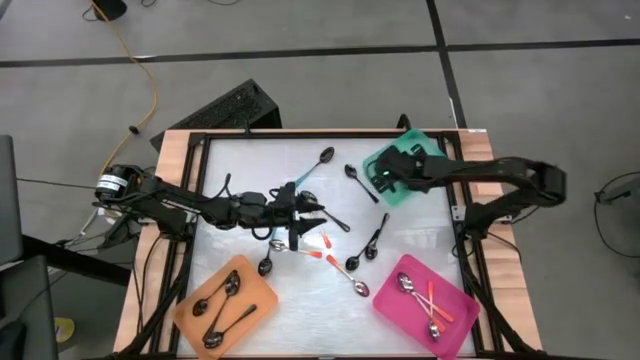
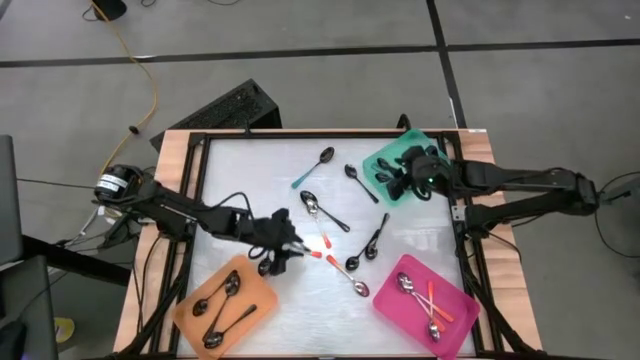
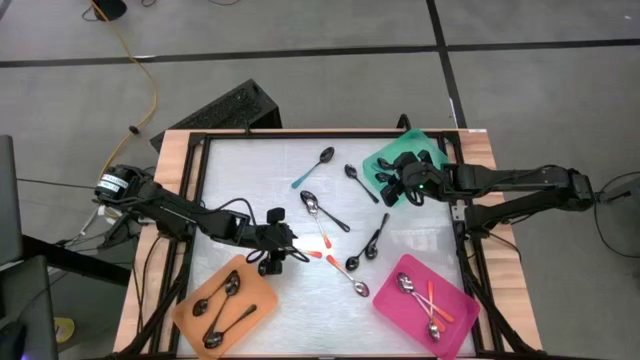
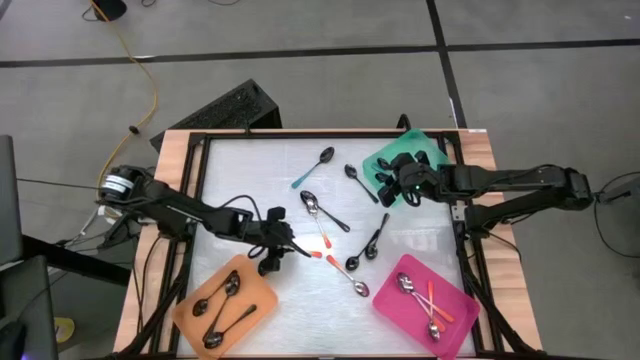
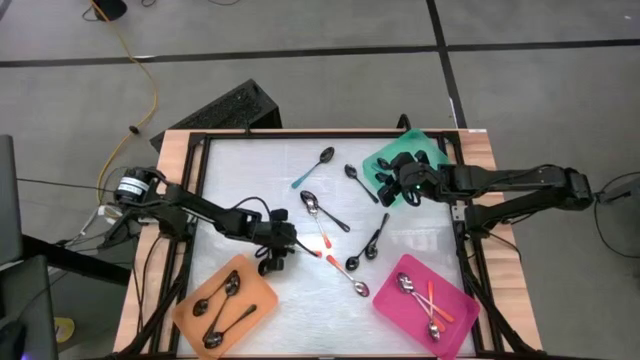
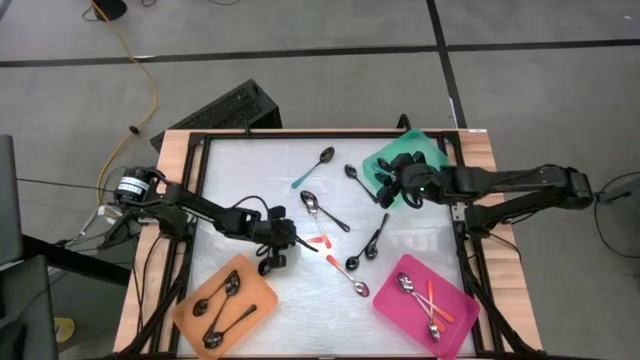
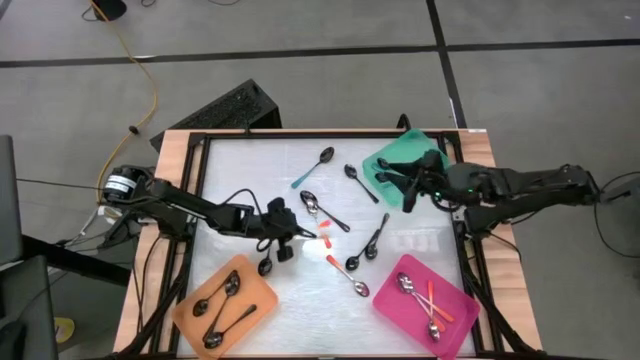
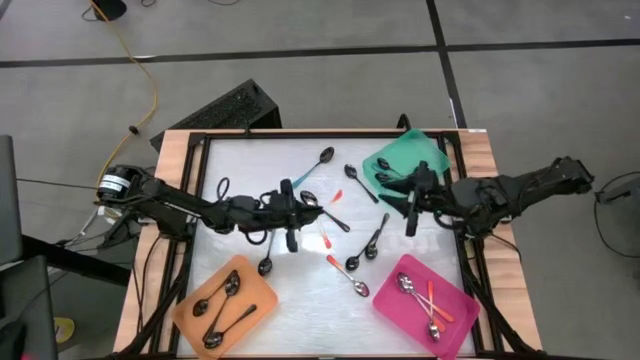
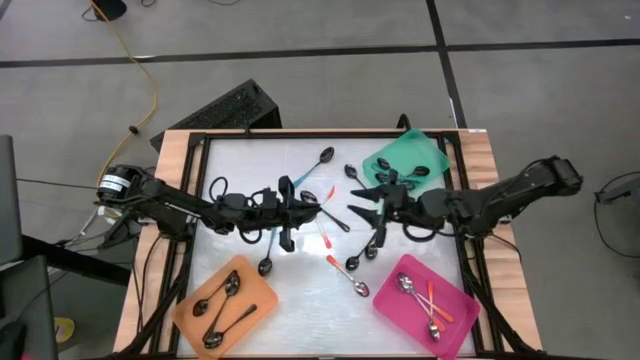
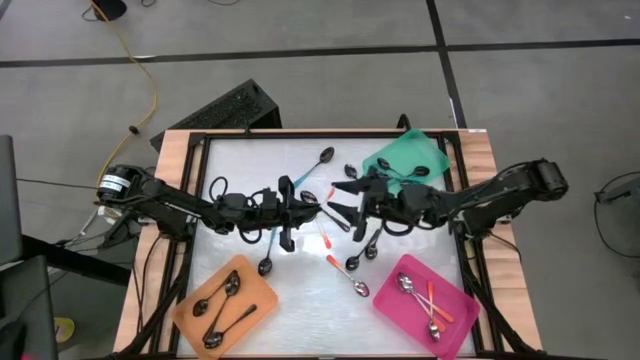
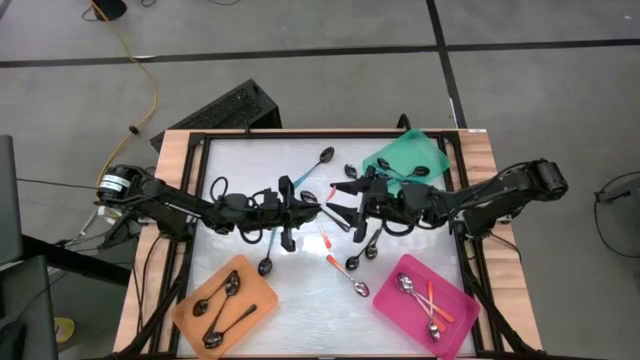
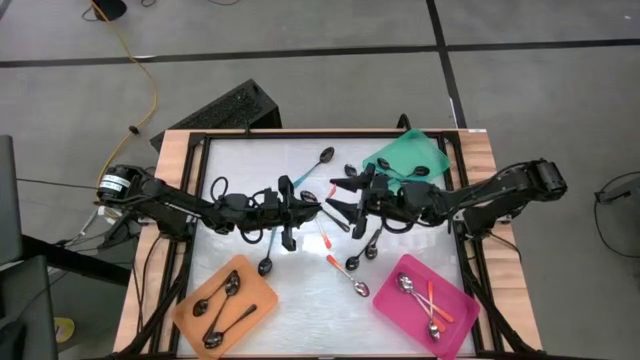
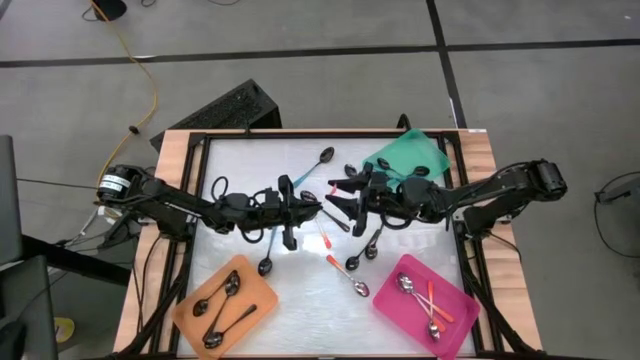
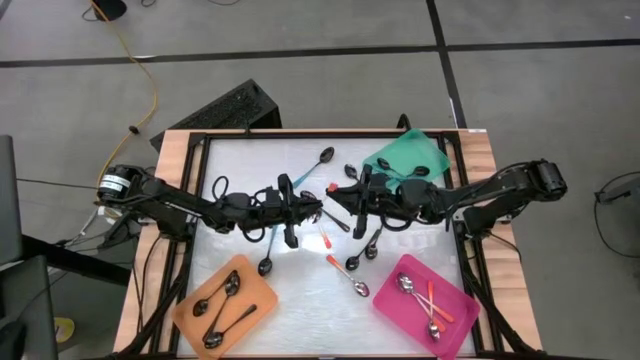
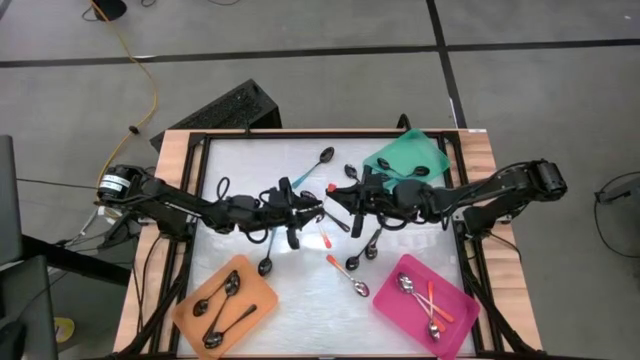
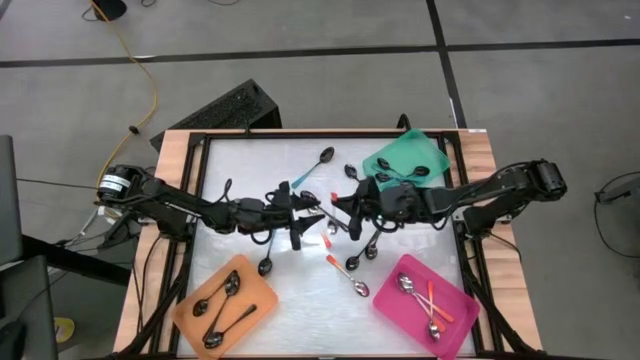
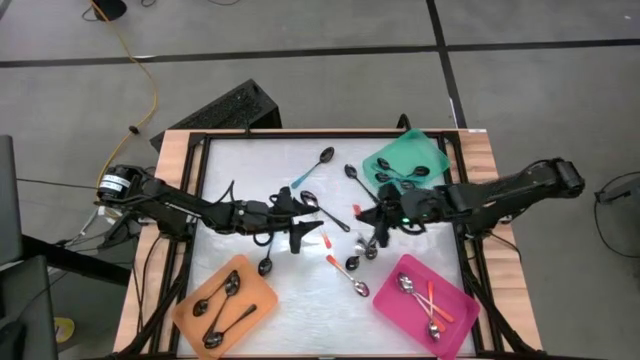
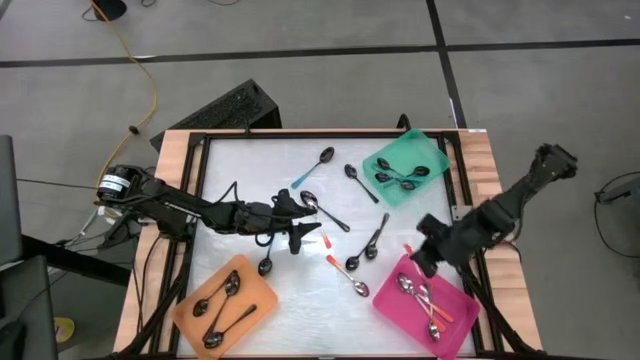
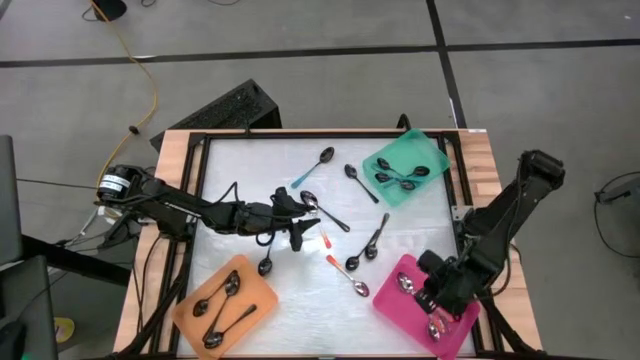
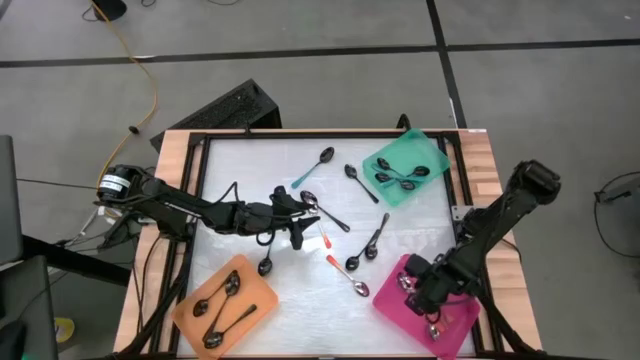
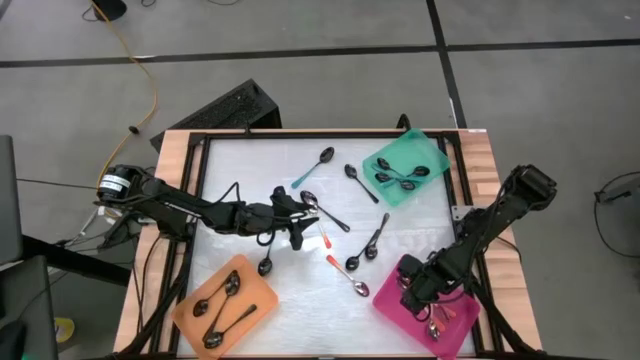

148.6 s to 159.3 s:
Task: Sort silverware by color (type)
Put the orange spoon into the red bin

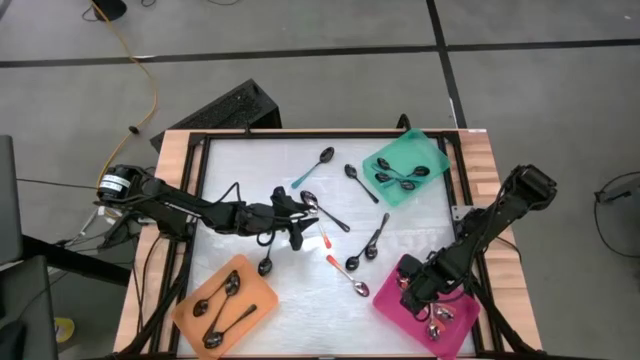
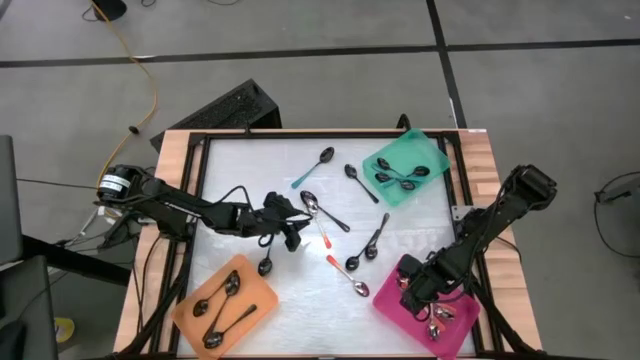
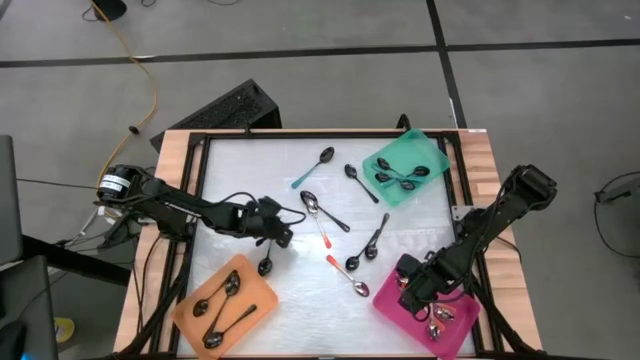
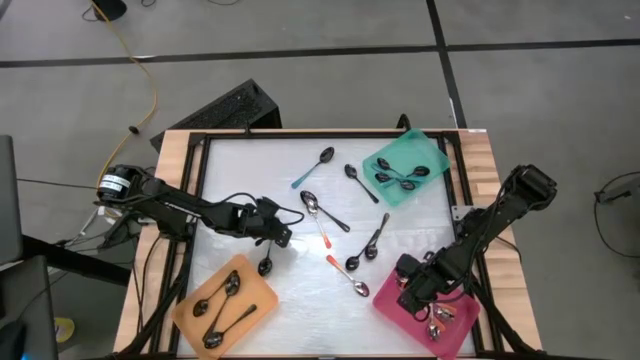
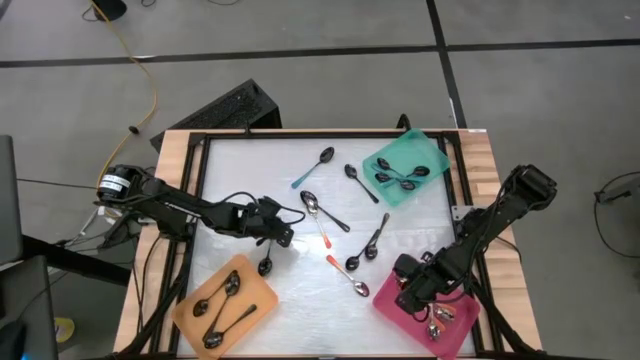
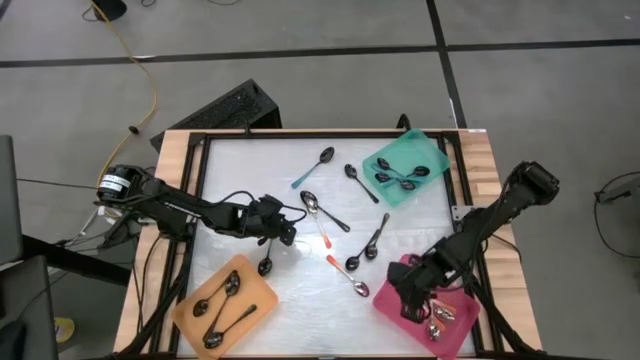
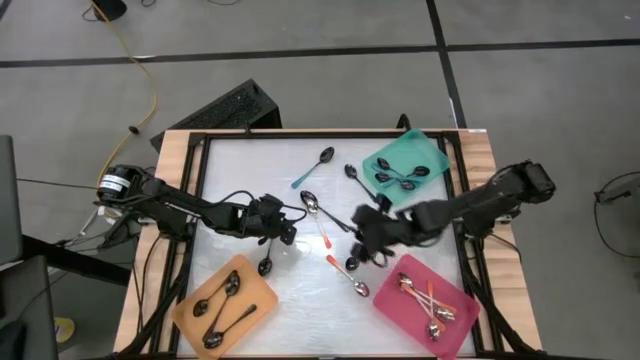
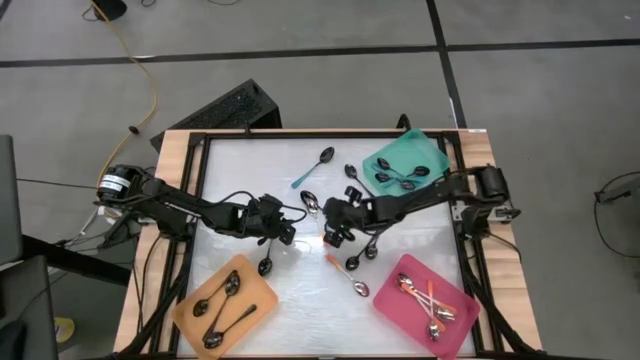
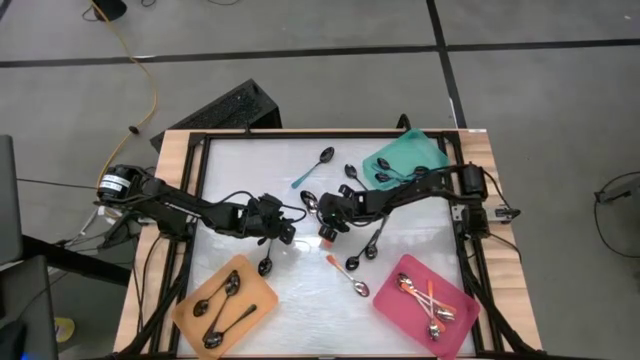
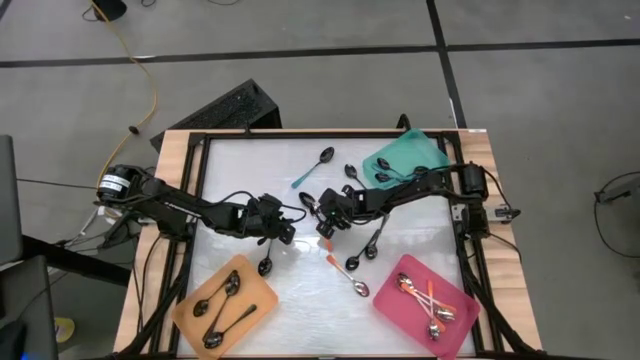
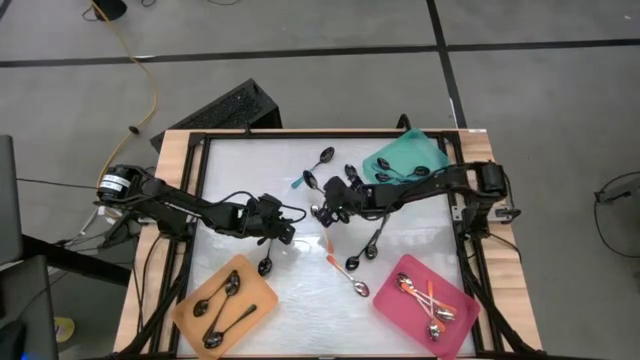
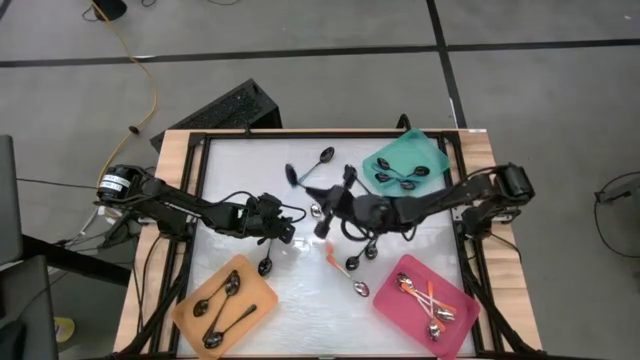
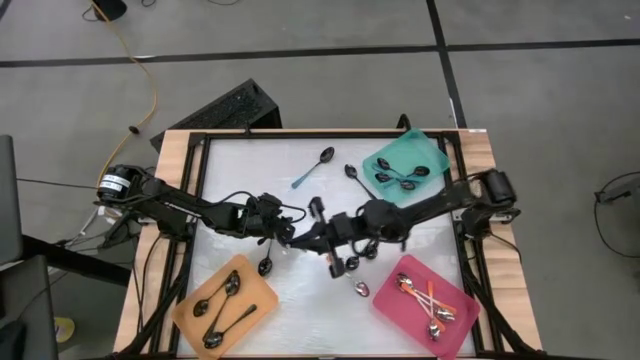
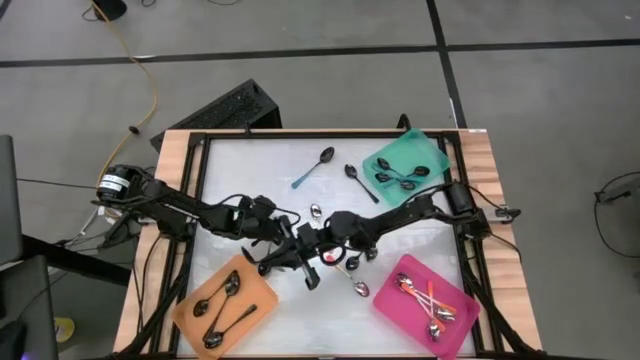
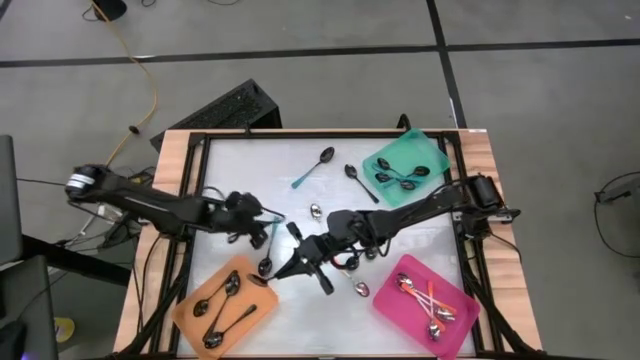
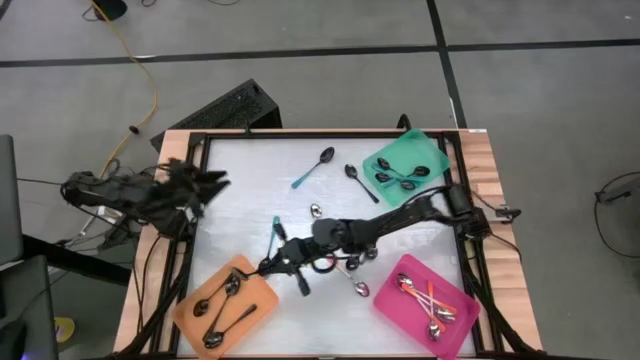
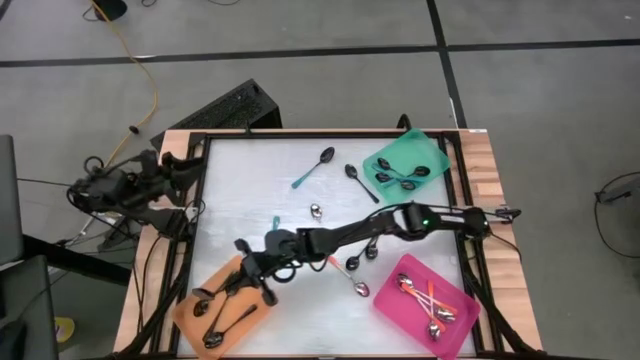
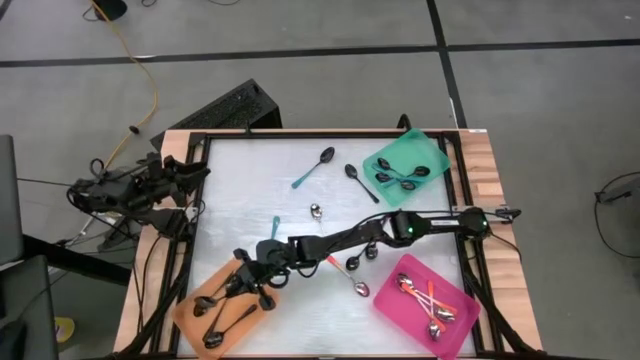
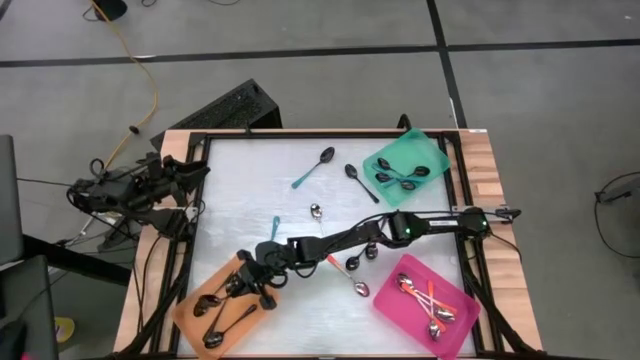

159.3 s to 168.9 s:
Put the black spoon into the orange bin

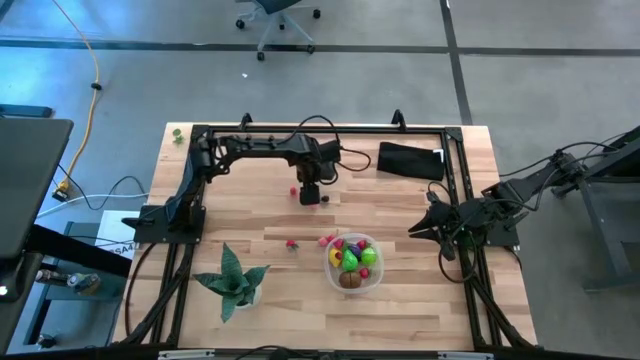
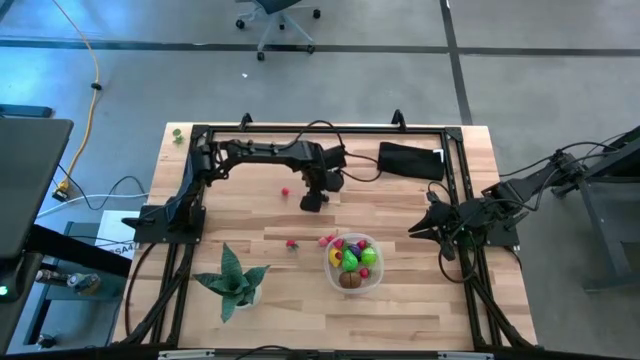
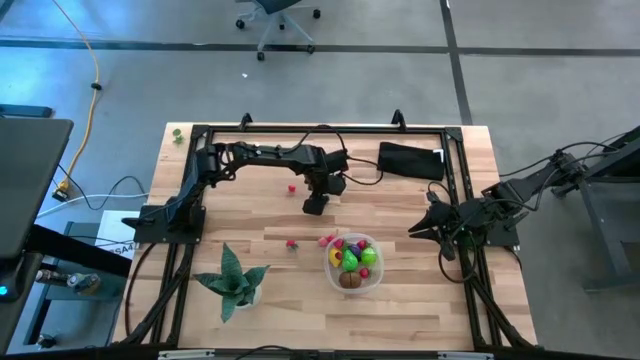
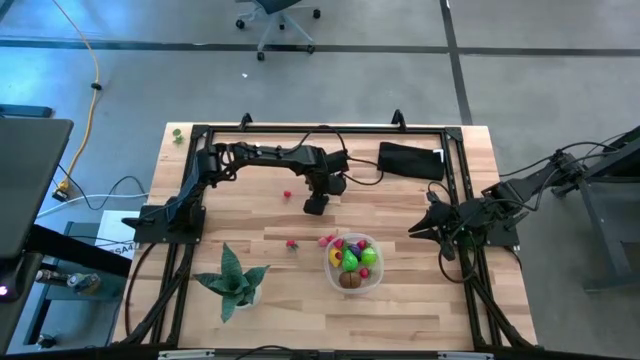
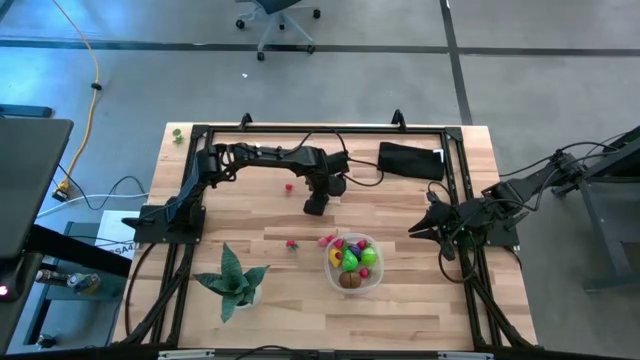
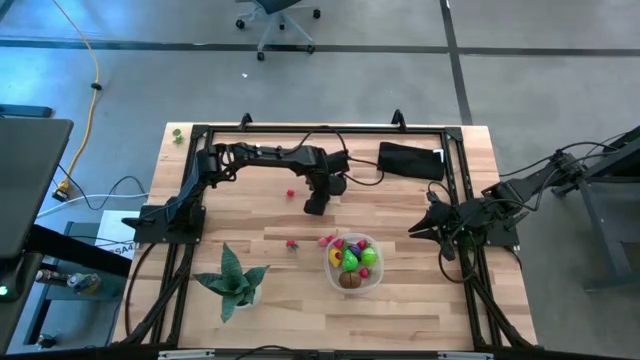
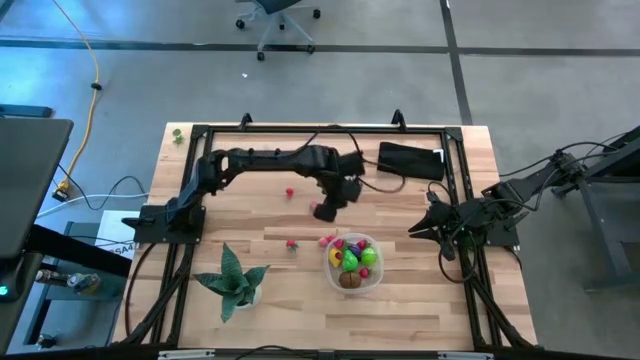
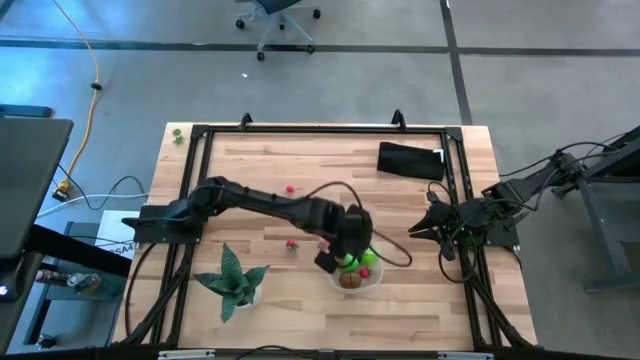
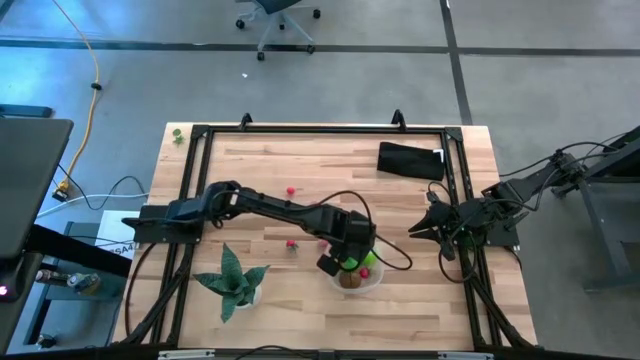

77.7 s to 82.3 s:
Task: Pick and placing Produce into tupperware
Put the blueberry into the transparent bin
